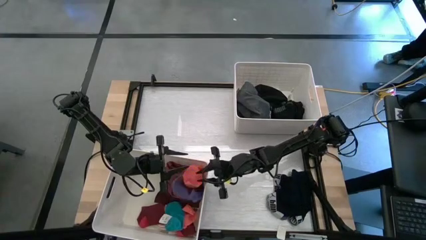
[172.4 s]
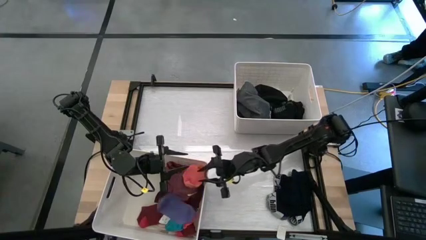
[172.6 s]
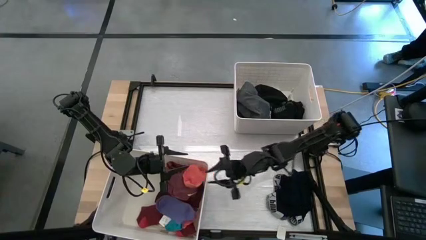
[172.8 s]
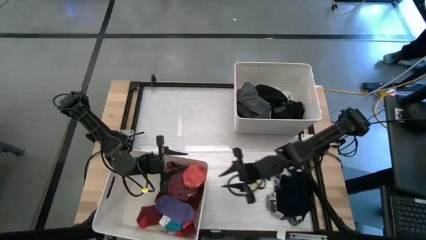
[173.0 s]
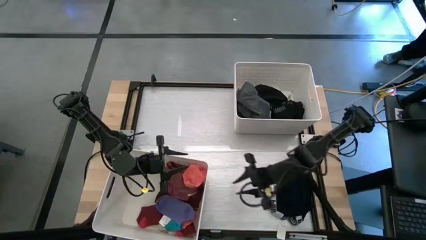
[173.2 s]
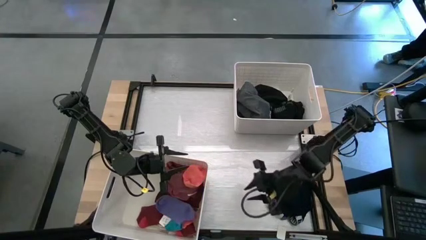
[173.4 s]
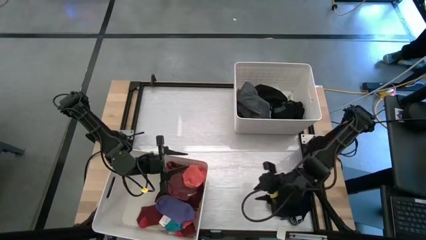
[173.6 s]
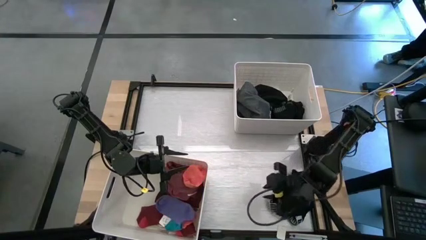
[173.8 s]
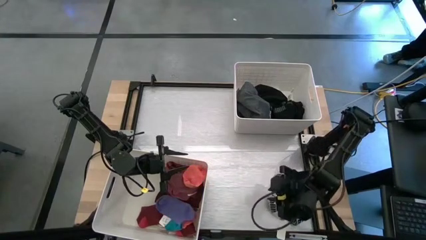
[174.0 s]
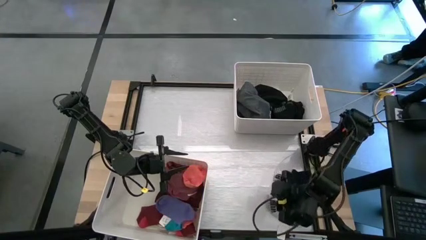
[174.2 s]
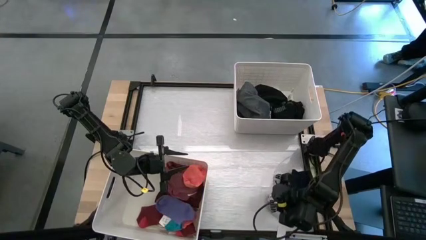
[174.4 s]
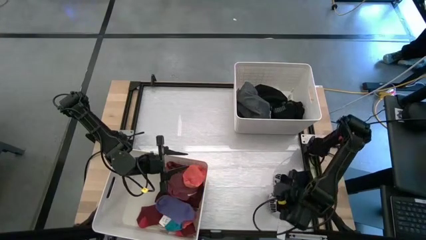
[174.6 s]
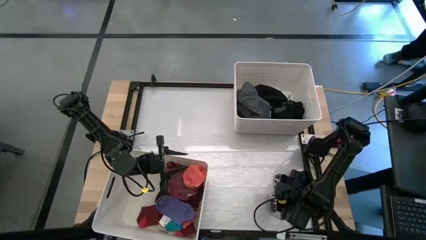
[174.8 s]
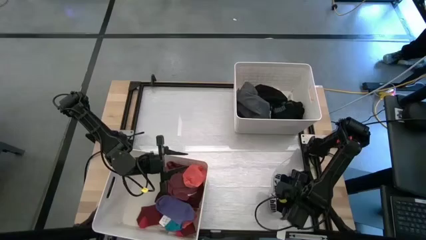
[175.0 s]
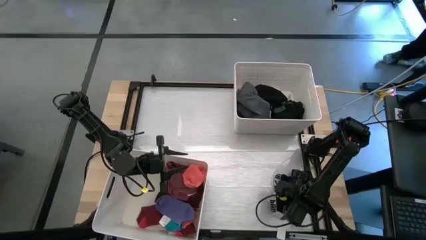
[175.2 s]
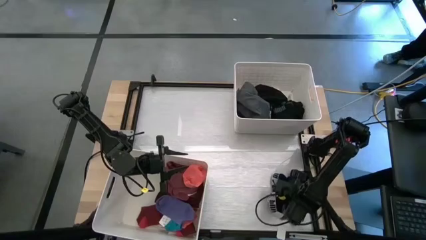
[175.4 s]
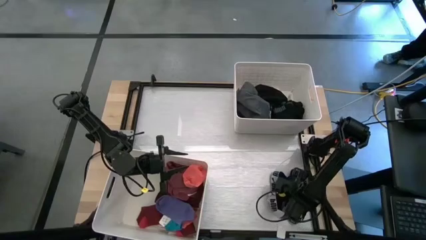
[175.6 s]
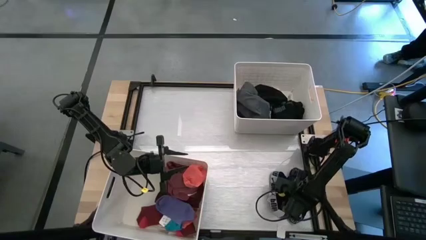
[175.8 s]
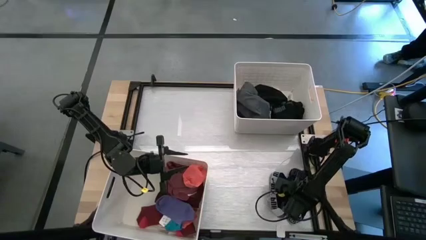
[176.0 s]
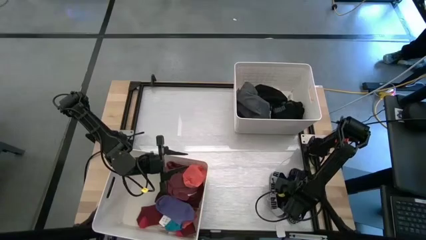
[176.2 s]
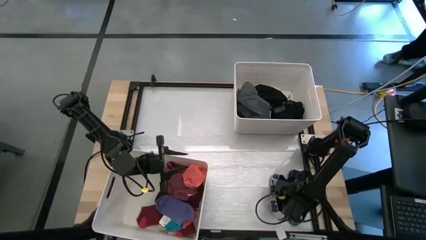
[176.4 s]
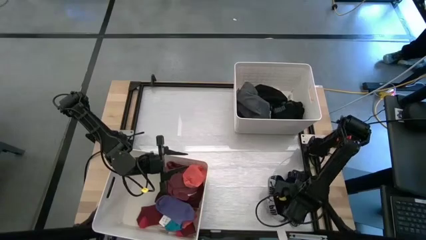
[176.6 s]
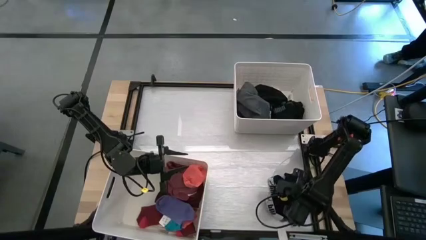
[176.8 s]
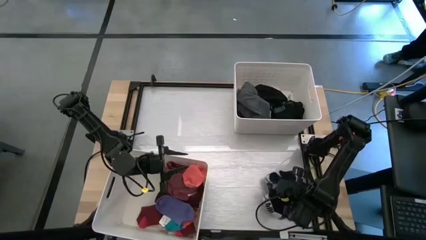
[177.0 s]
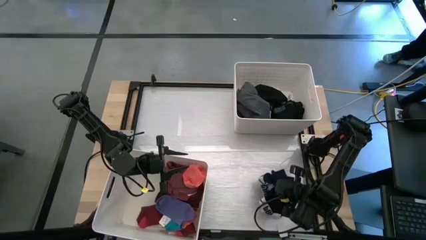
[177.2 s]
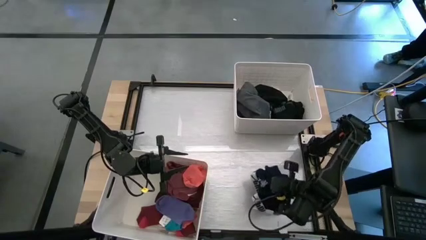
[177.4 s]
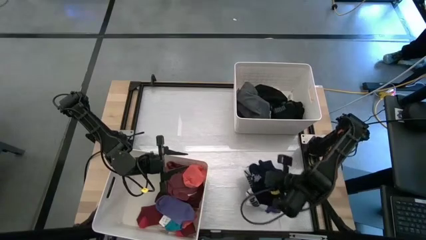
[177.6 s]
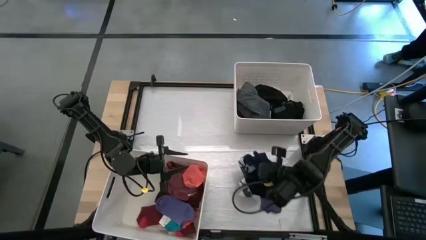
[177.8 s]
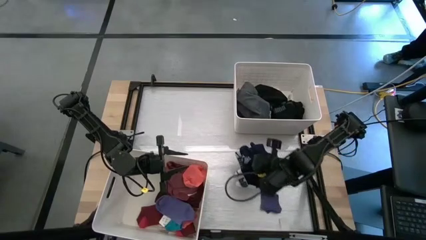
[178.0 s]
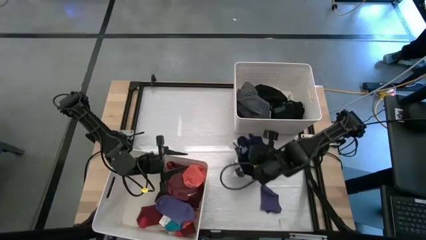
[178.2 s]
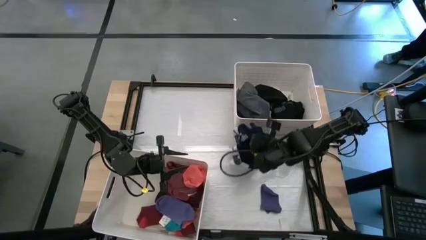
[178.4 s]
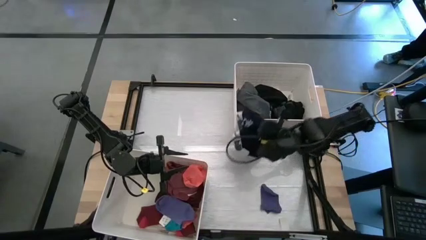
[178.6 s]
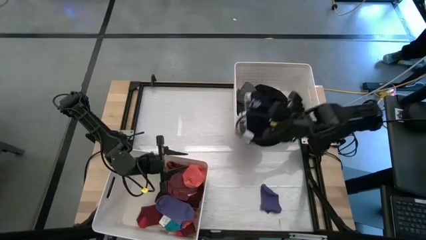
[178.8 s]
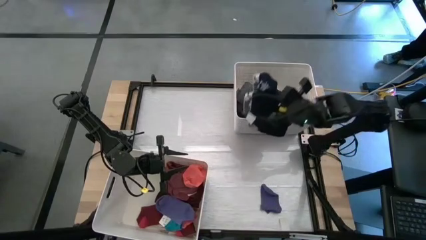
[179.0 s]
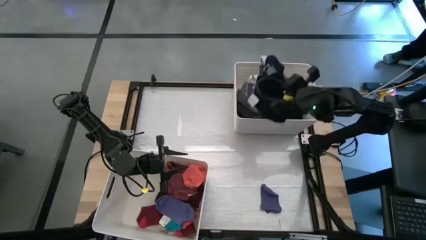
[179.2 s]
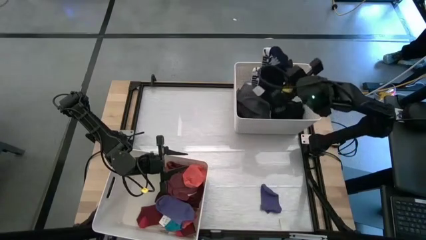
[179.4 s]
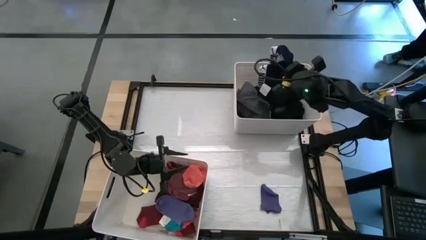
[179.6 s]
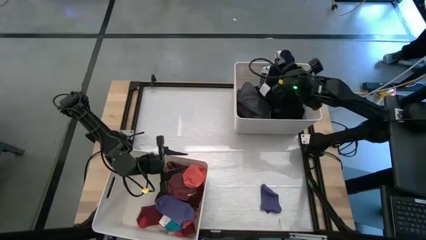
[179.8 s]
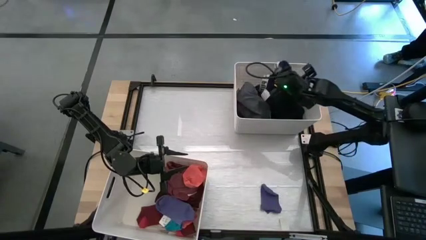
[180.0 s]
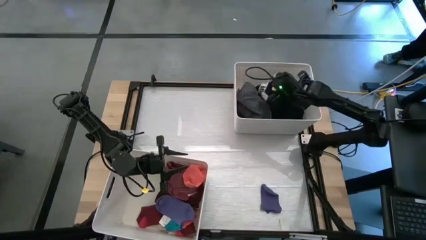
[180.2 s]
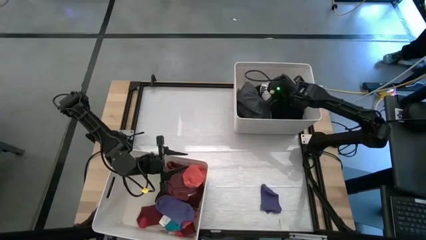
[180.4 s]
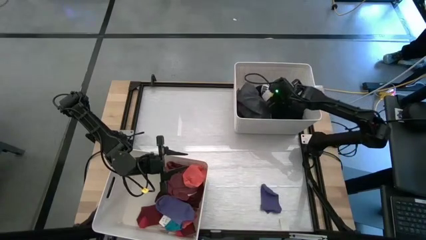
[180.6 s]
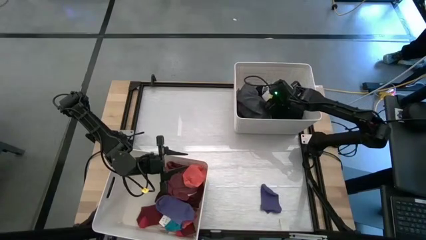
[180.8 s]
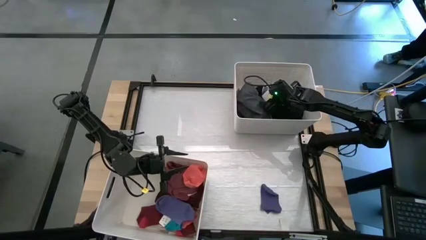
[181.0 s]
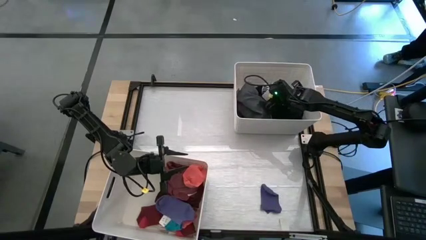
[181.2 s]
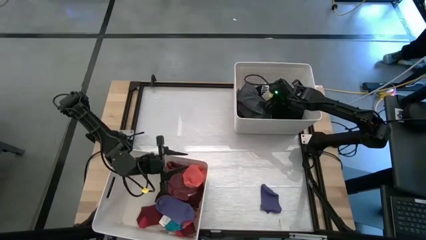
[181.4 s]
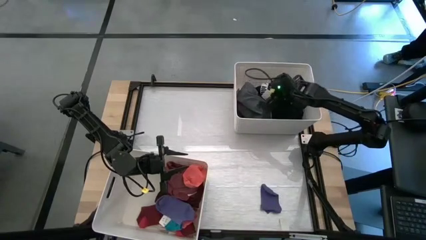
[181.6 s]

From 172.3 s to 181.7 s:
Task: Sort clothes
Put the dark blue underwear into the top white bin

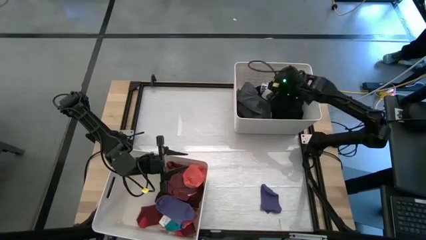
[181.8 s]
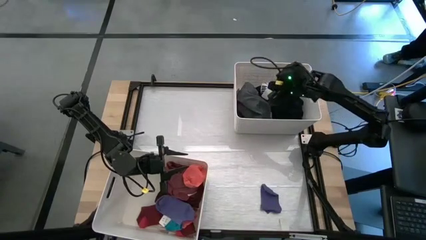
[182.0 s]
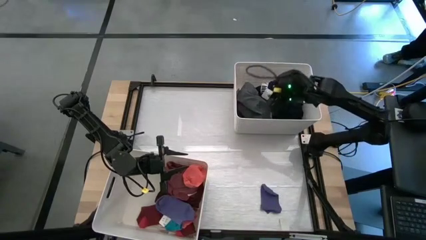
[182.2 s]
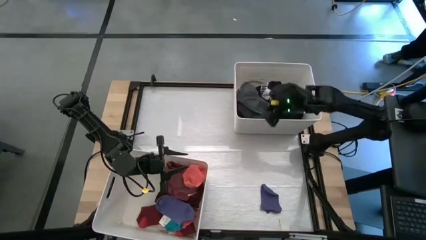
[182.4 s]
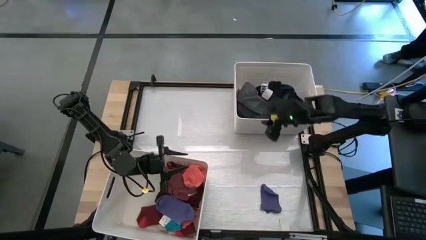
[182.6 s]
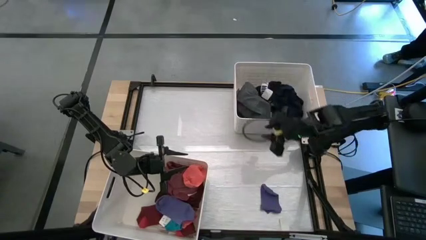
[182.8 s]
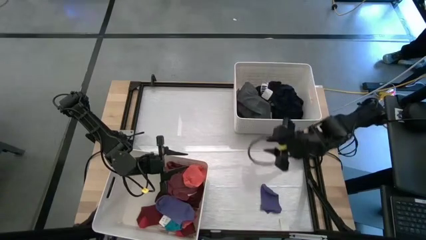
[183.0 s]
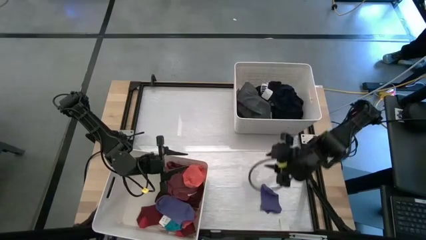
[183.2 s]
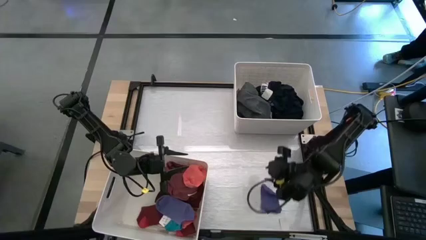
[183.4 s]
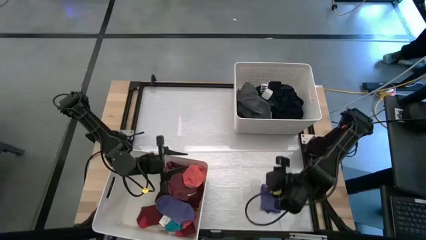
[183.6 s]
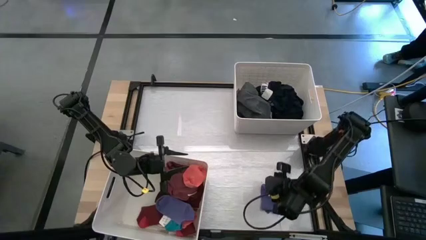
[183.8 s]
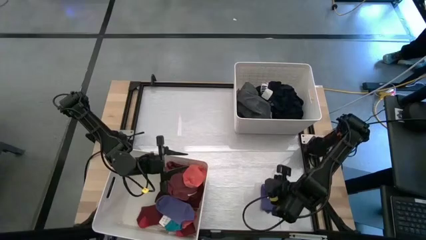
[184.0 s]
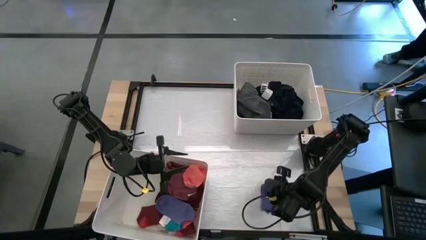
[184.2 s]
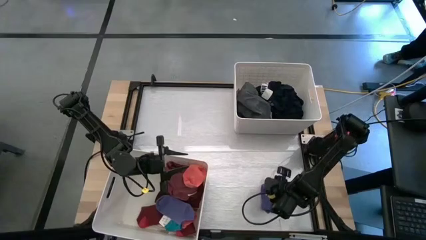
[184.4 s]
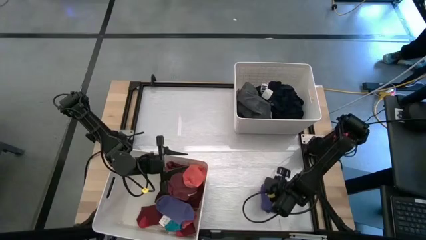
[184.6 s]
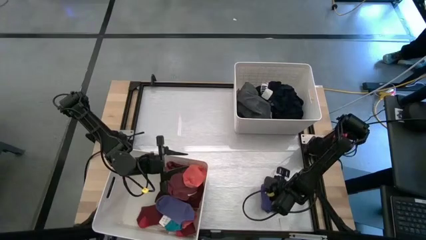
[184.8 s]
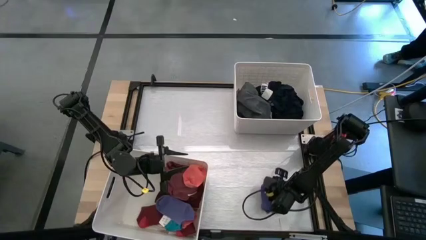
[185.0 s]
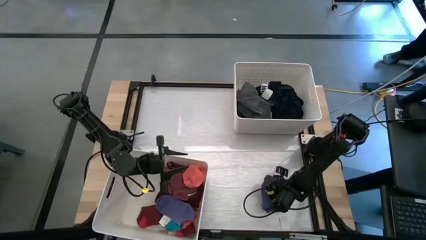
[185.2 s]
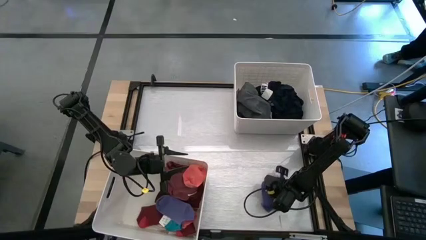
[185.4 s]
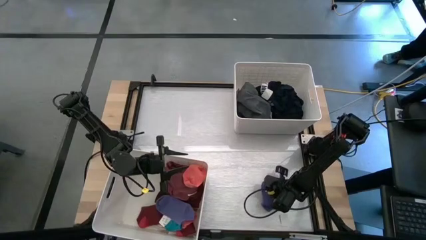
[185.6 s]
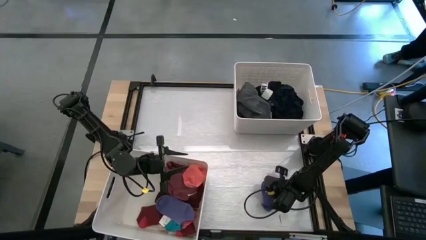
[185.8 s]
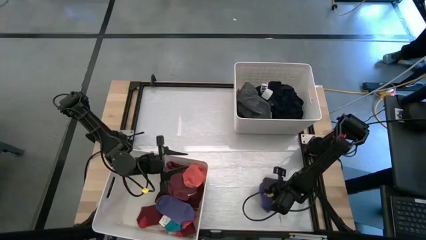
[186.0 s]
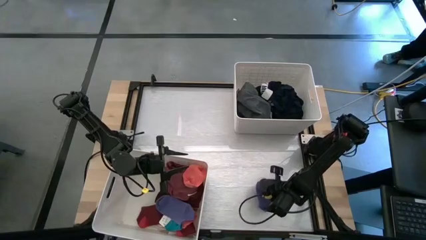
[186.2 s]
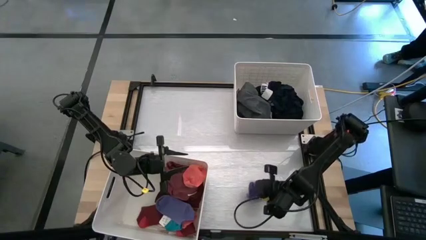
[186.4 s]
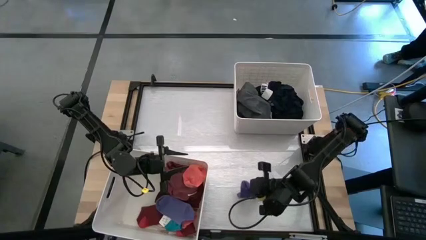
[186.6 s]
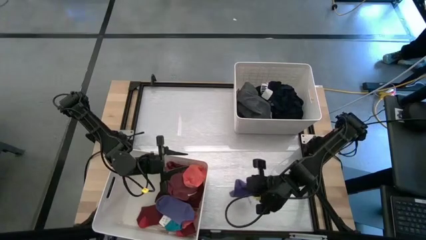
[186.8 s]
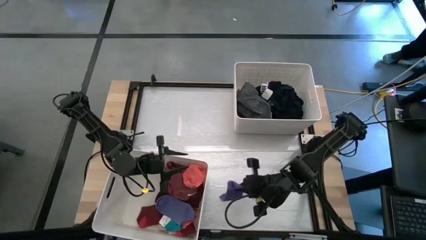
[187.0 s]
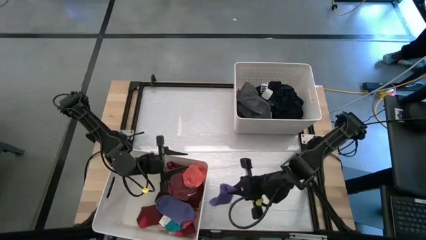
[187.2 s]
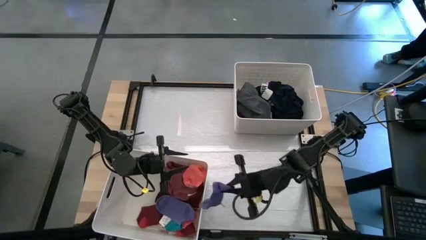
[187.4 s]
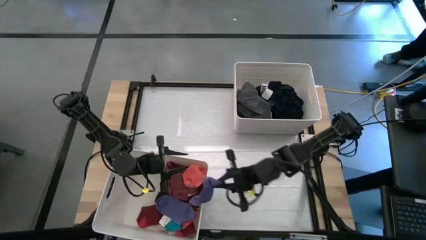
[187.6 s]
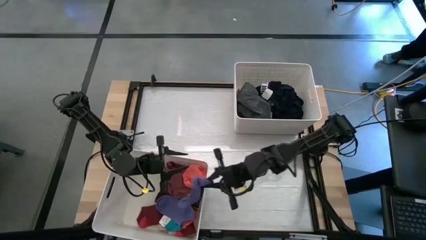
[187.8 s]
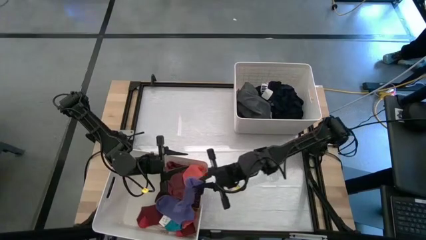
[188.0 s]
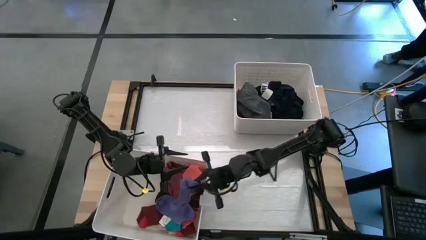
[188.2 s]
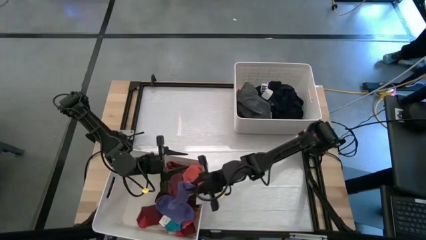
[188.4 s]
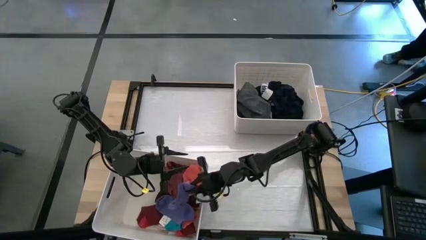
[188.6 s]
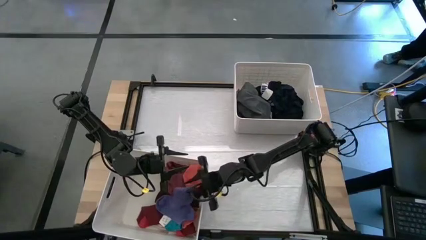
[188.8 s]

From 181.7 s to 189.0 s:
Put the purple sock into the top white bin
